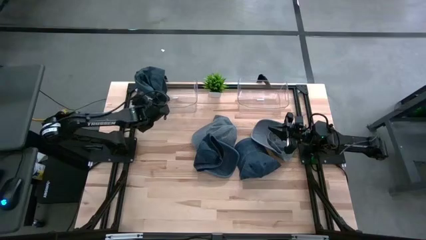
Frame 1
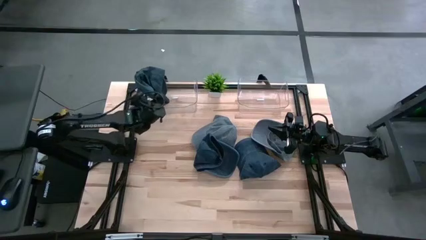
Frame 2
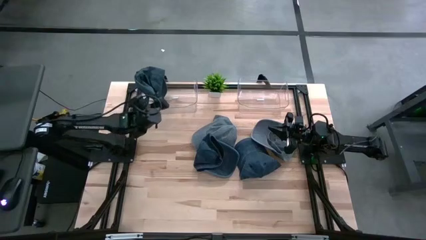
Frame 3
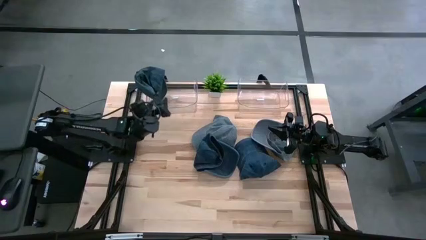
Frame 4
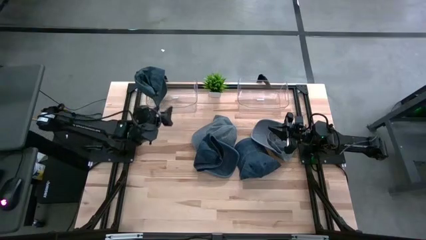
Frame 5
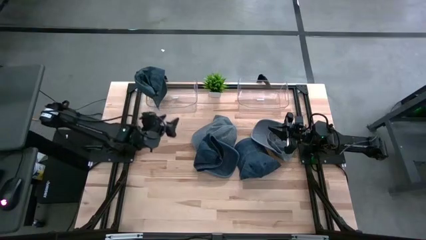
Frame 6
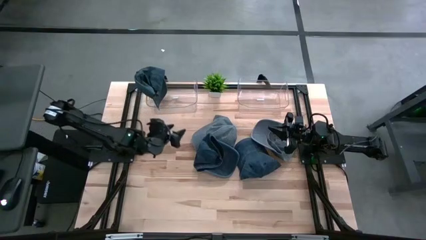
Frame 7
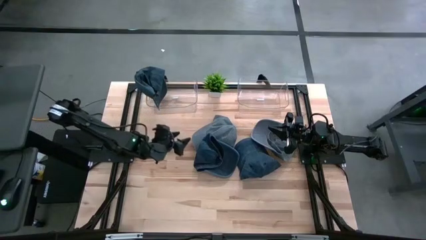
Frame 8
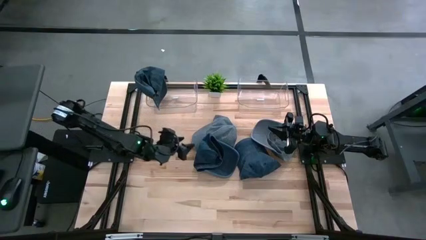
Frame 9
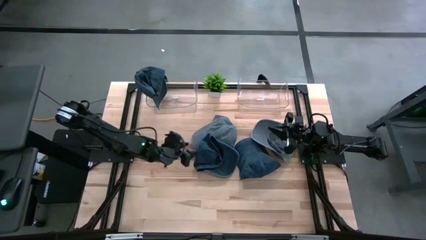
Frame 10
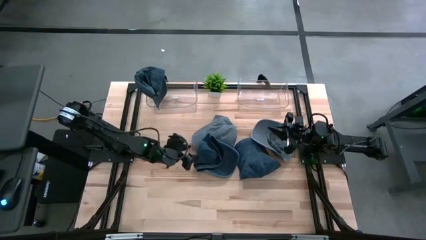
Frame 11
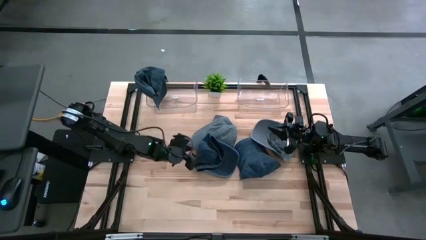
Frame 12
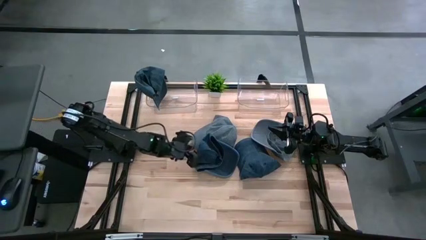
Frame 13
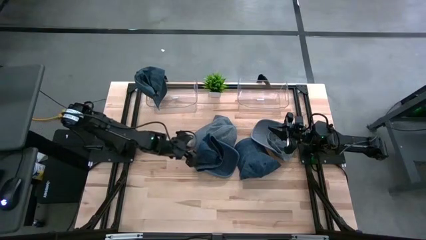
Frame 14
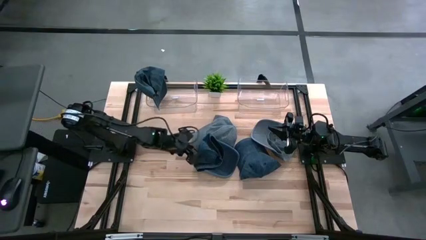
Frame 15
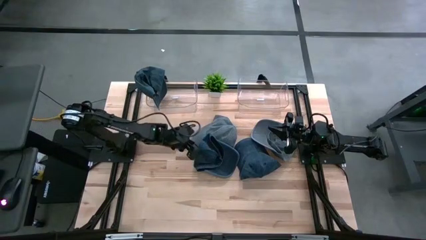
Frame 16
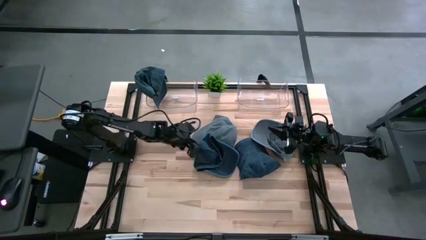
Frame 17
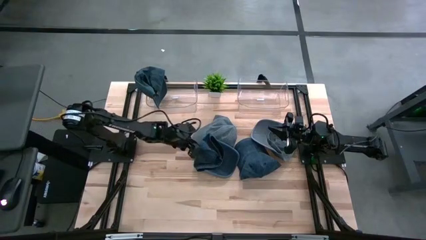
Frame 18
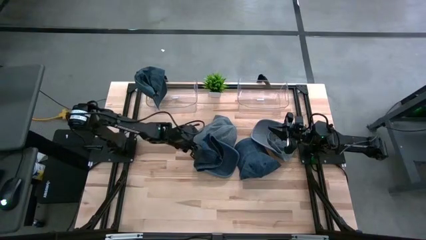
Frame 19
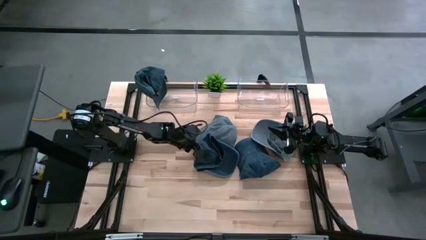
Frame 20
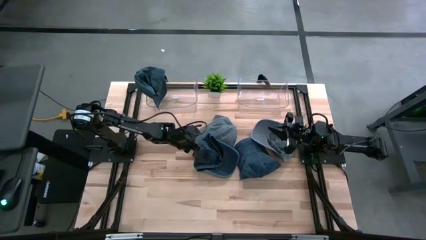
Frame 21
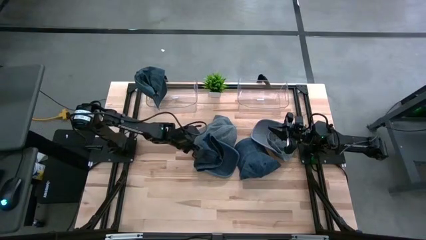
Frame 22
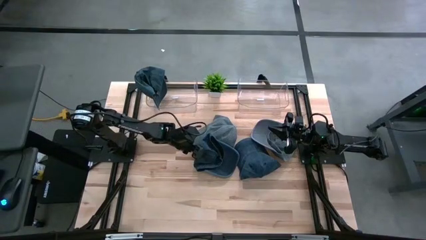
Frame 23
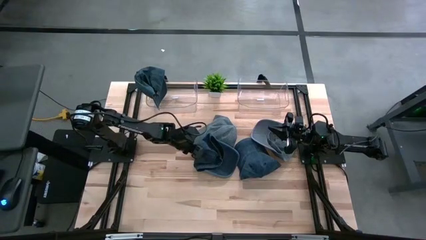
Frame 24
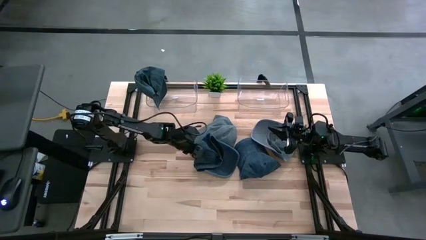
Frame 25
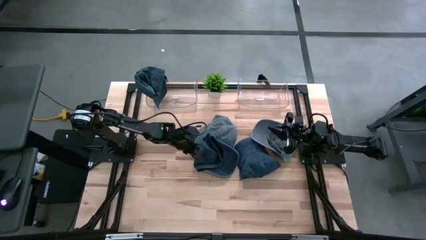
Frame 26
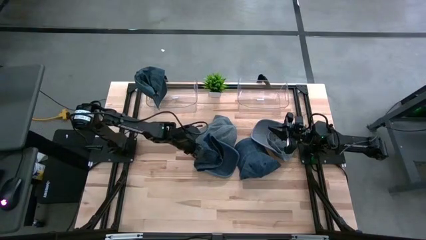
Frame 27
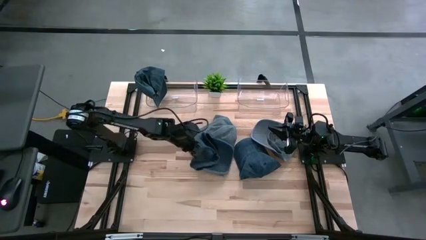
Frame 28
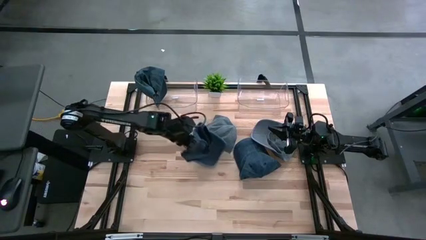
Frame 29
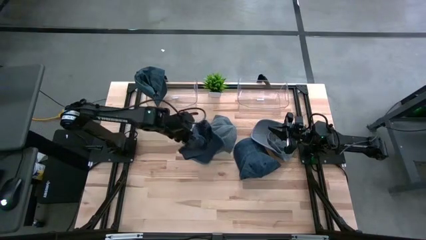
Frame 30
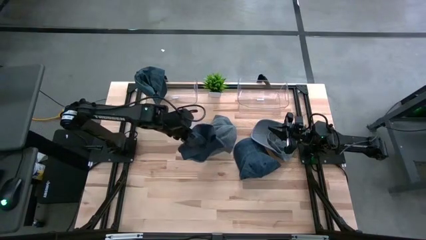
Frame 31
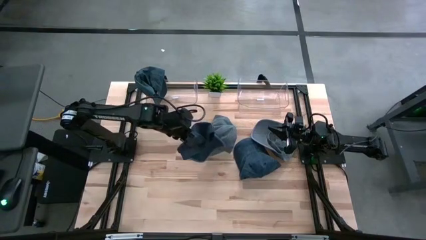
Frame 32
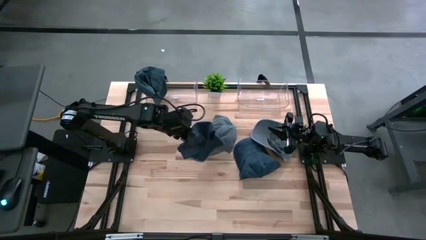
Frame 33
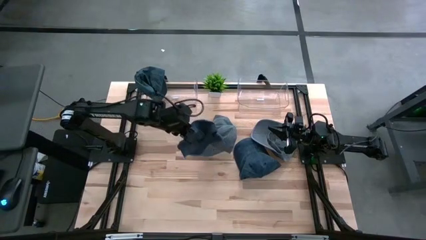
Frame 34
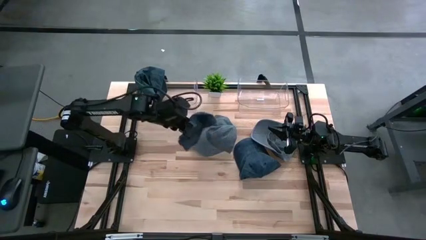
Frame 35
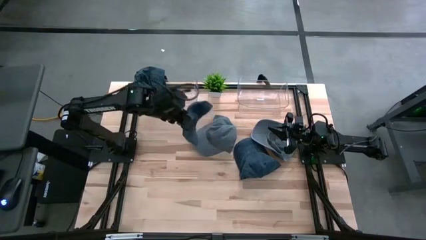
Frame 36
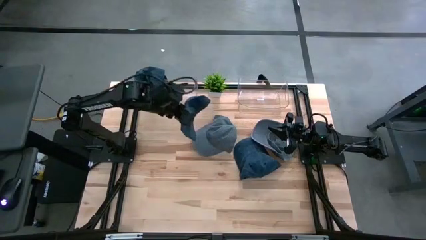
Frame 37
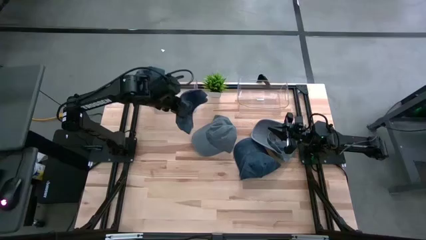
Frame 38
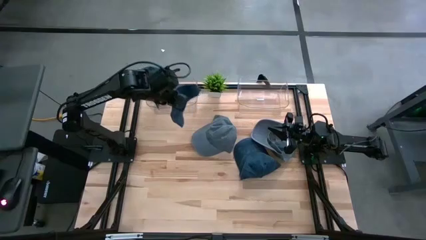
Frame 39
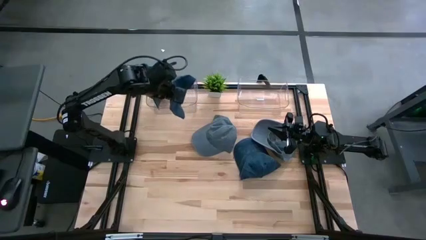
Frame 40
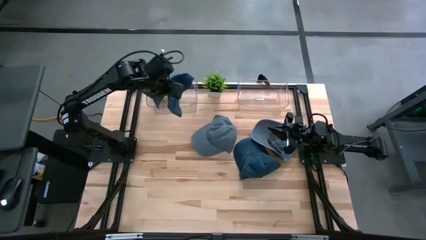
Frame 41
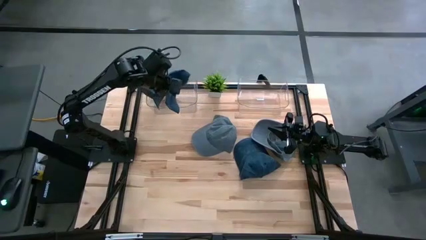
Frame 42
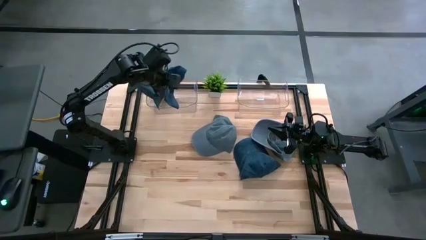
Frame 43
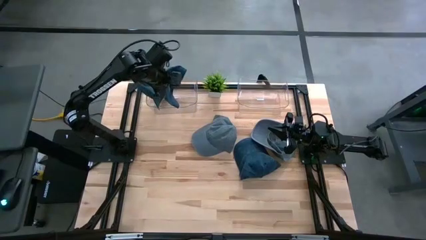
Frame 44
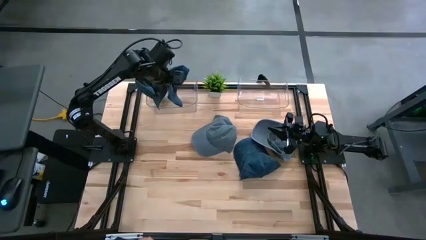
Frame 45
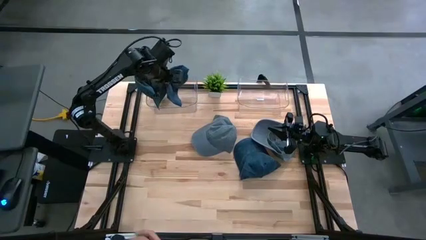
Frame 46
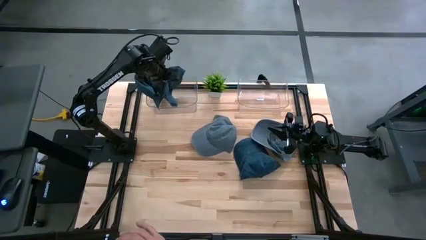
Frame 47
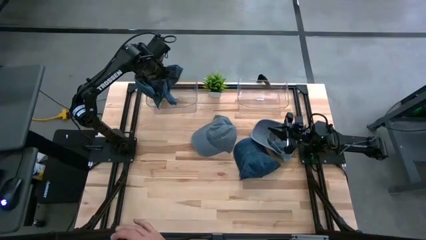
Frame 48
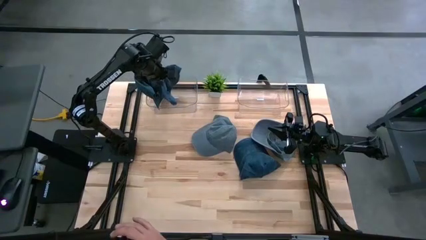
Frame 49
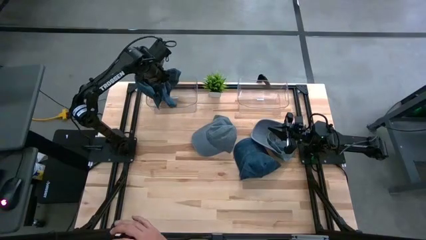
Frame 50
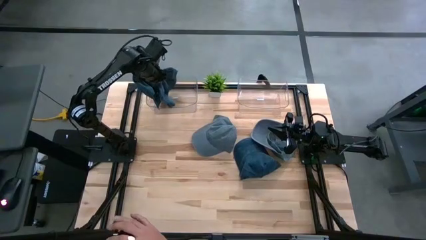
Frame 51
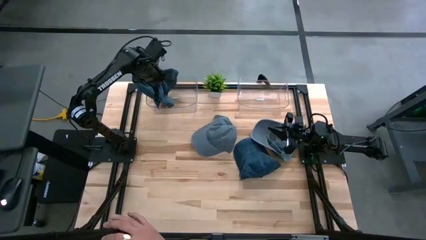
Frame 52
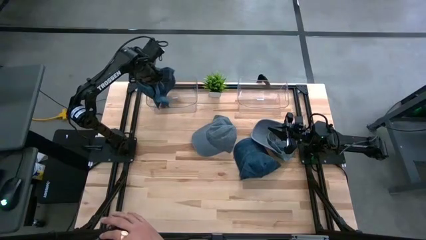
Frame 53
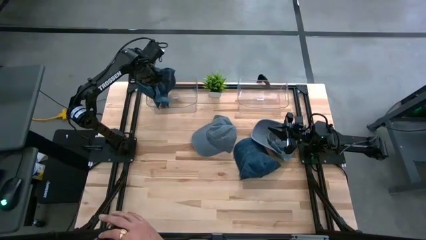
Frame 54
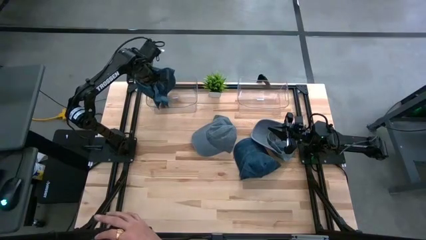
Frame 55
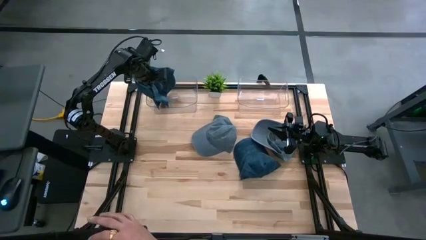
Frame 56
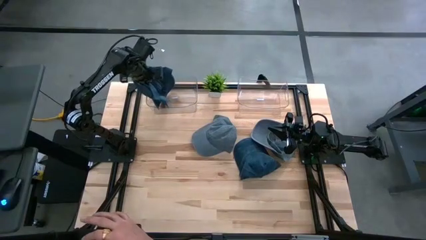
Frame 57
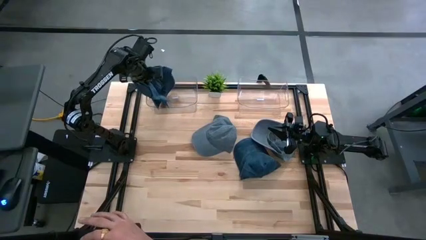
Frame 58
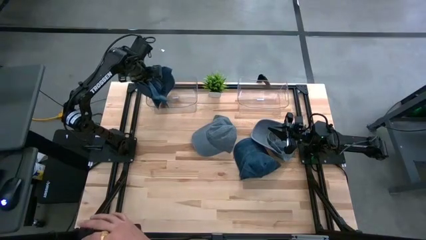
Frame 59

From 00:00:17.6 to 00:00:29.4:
Task: Pick & Place hat
Put the left dark blue cap into the left transparent bin
